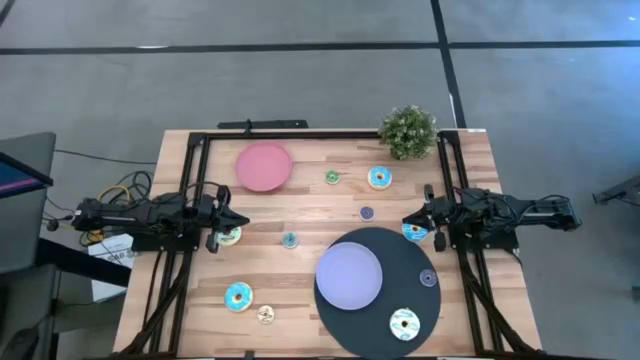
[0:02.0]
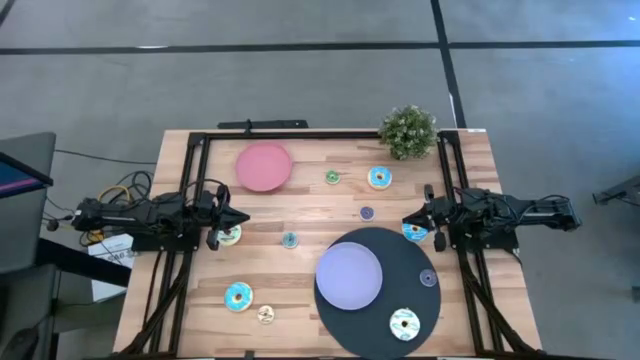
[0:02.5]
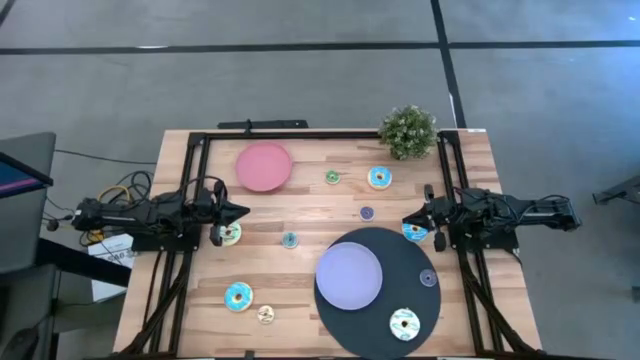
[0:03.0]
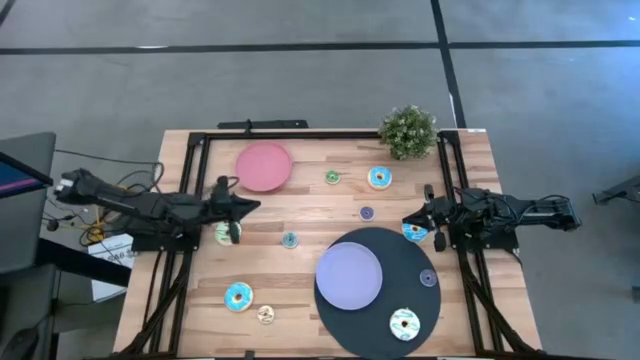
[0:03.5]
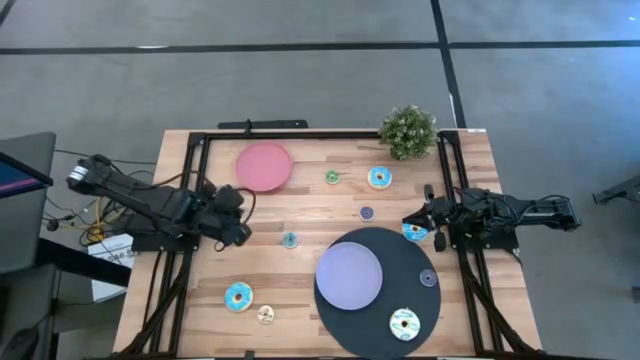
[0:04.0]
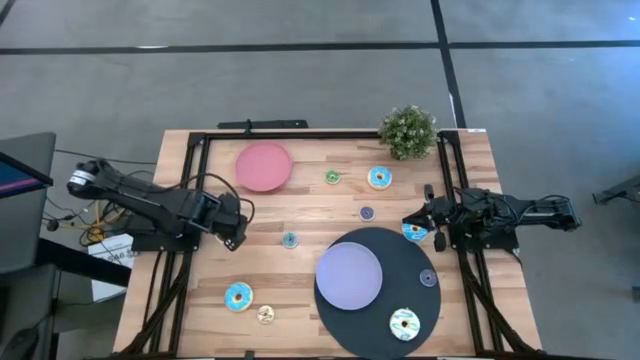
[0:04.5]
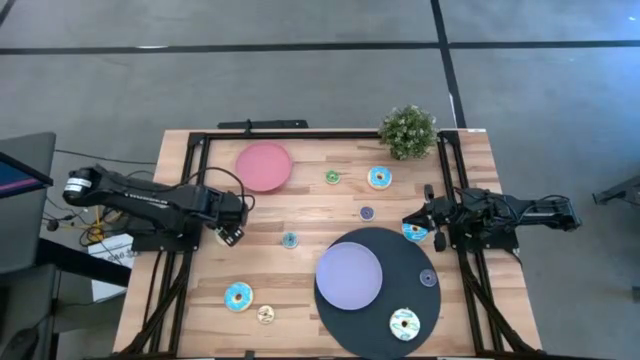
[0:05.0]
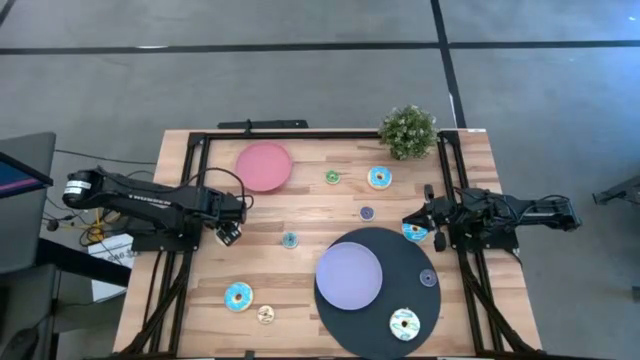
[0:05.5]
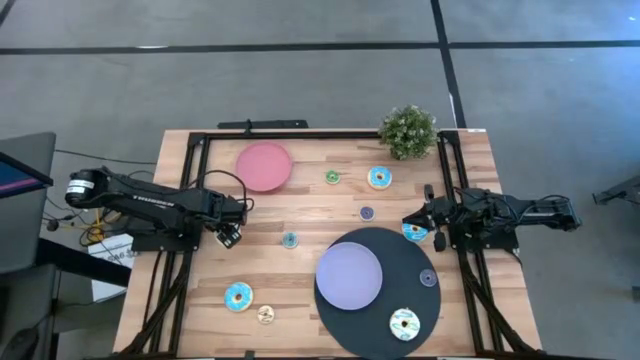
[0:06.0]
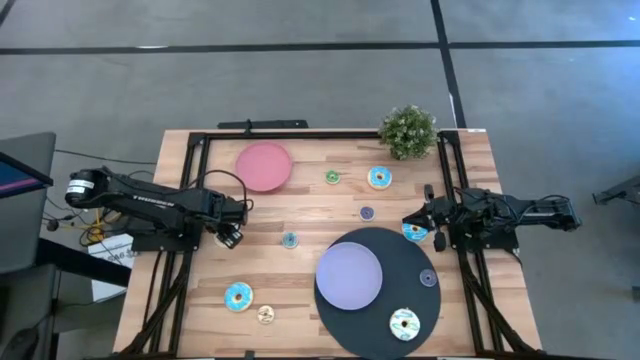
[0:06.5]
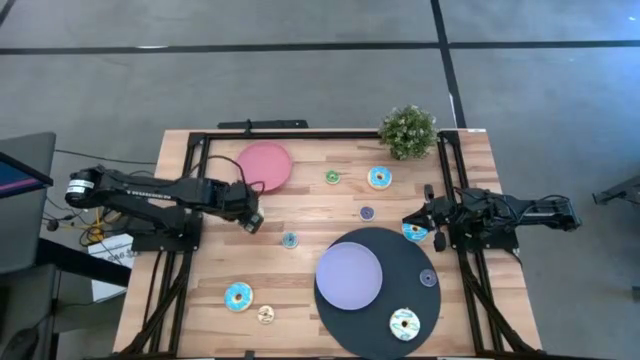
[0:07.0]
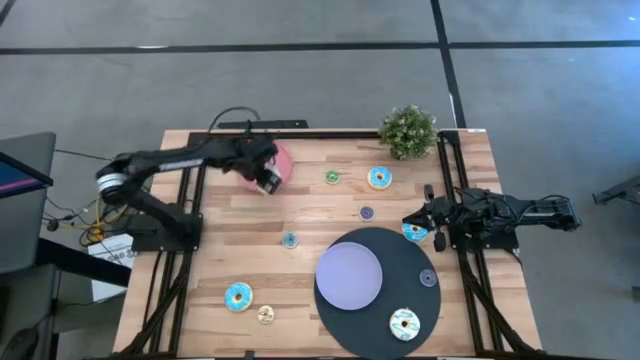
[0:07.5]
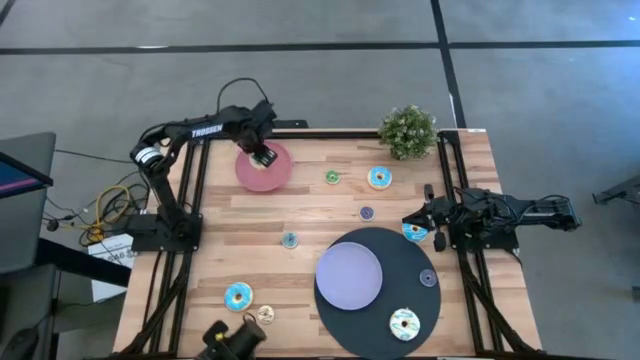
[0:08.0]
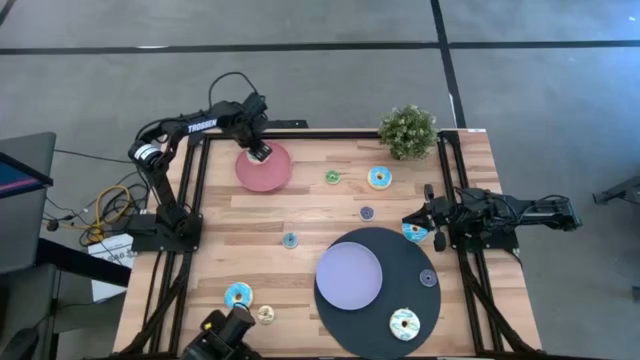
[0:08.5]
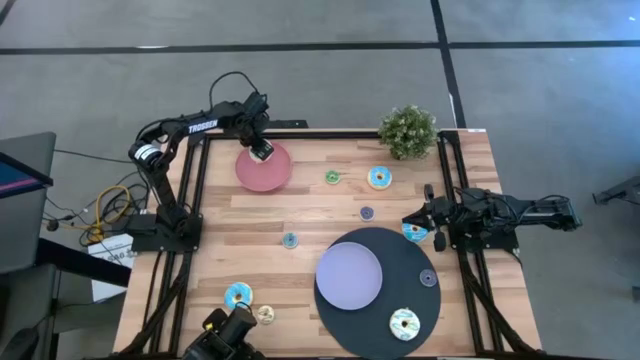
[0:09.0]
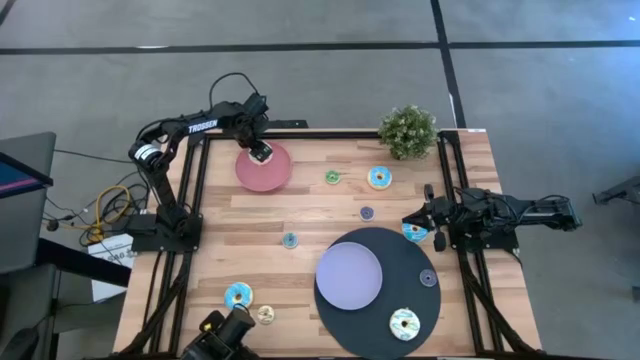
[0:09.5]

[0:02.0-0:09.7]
Task: Pick & Place donuts
Put the large light blue donut on the pink plate

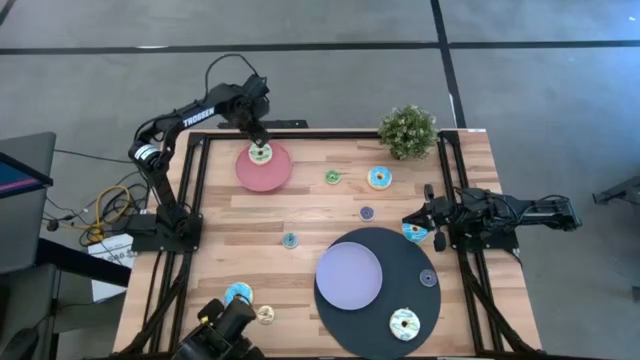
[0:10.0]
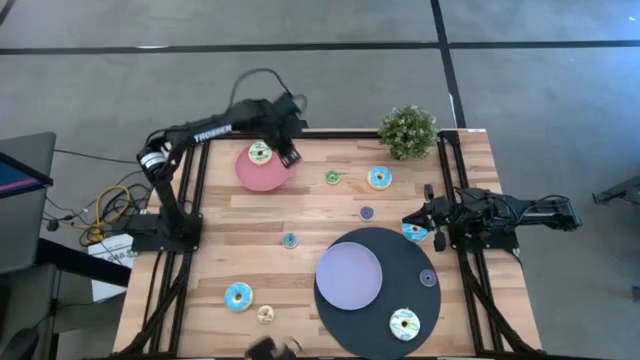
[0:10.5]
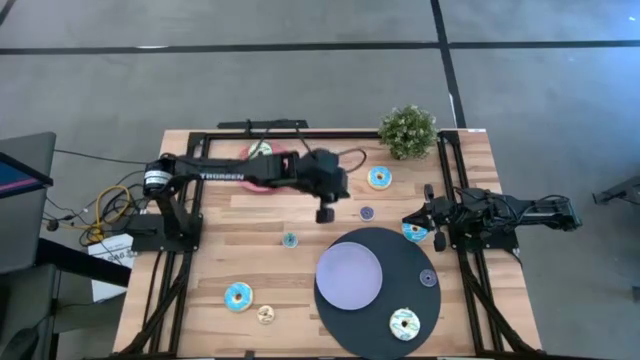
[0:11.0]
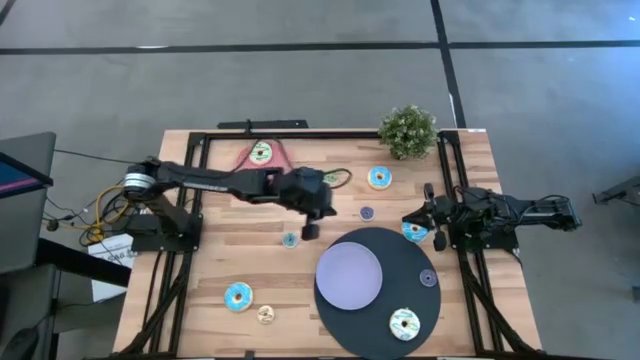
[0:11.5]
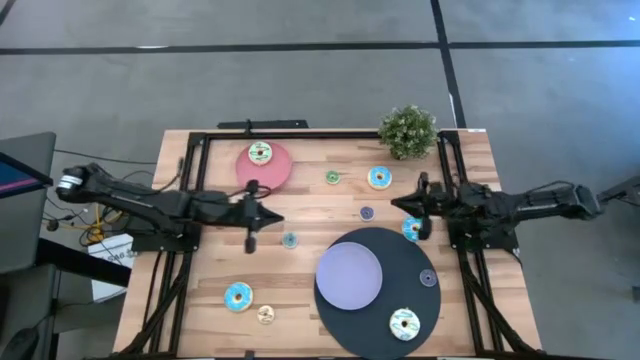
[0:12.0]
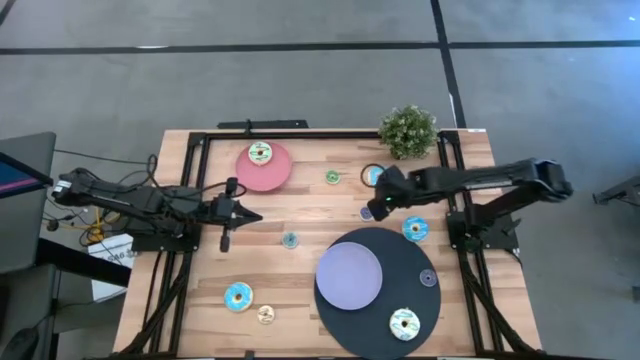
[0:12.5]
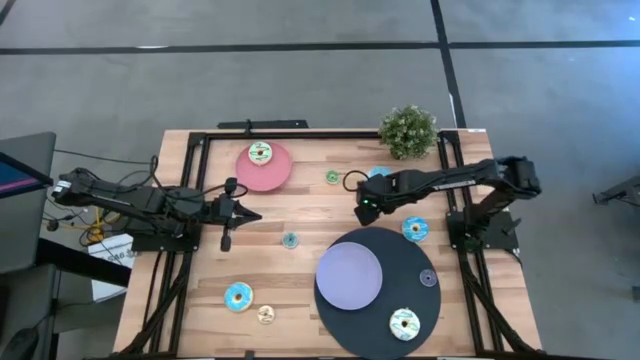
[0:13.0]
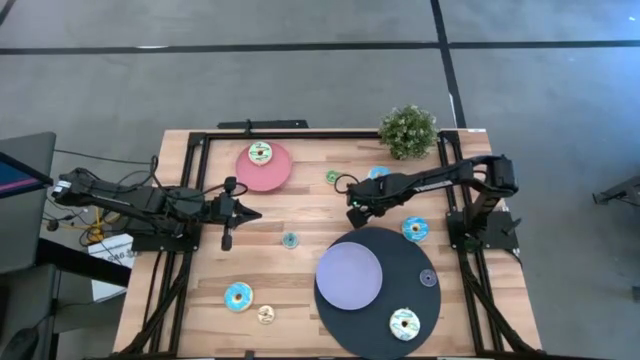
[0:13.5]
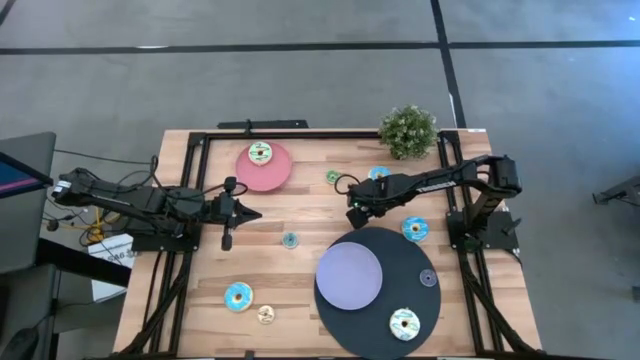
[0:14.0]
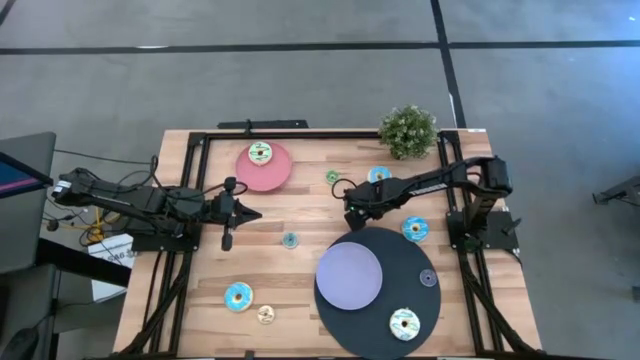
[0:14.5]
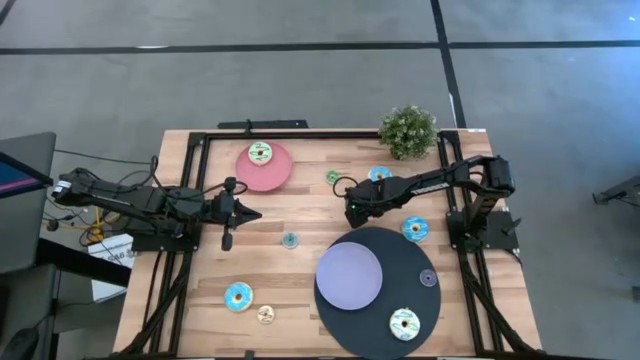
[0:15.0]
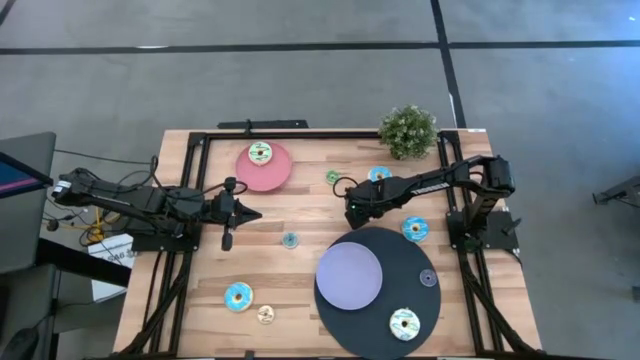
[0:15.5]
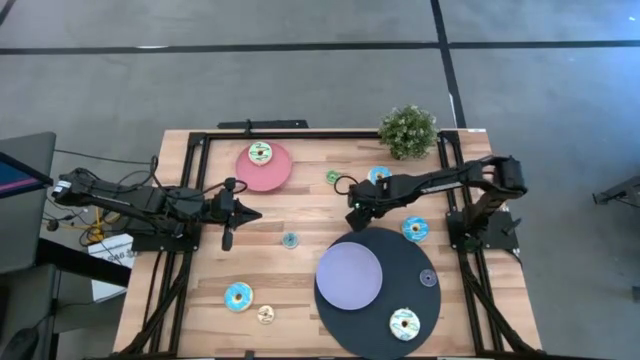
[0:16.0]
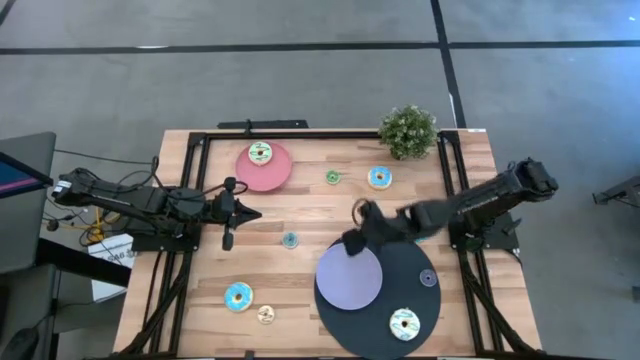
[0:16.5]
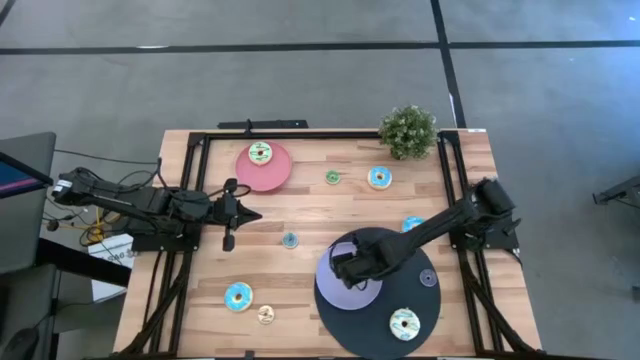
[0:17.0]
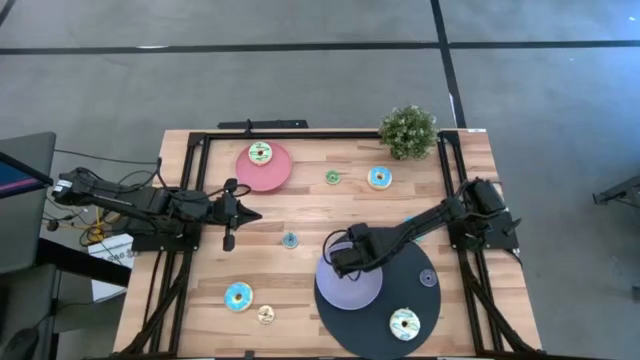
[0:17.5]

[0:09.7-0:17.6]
Put the top small purple donut on the purple plate

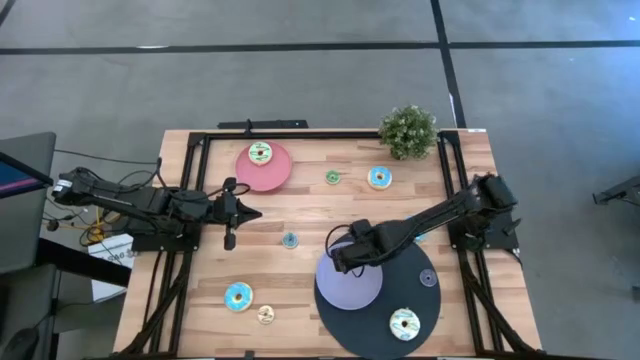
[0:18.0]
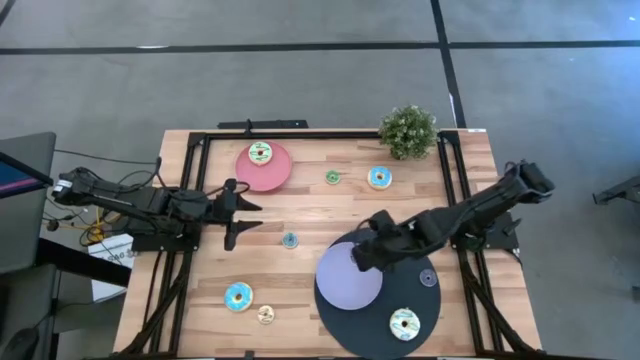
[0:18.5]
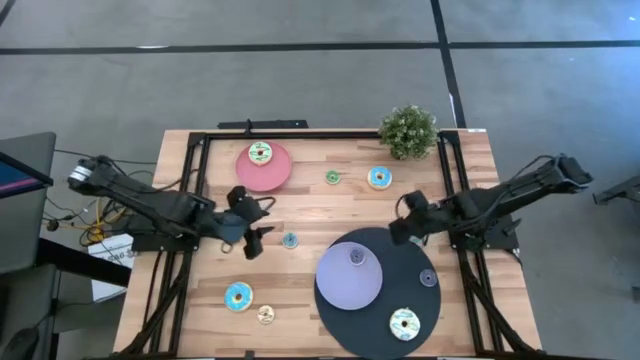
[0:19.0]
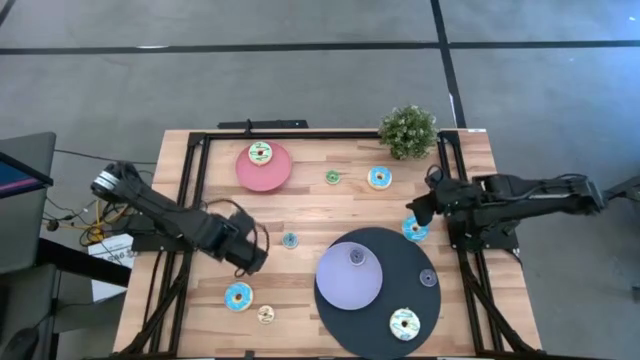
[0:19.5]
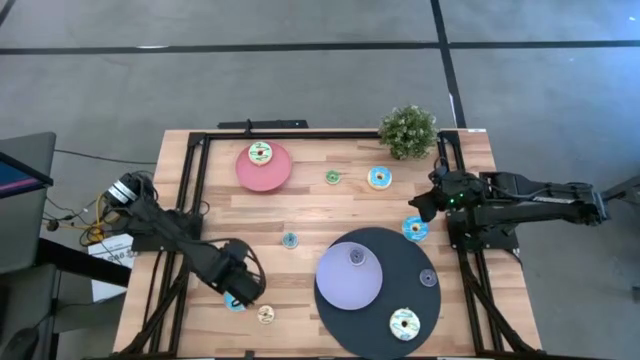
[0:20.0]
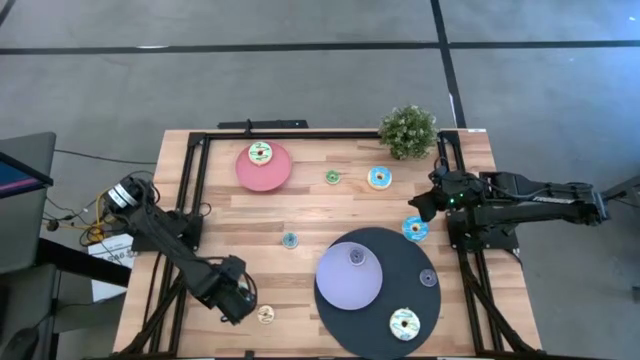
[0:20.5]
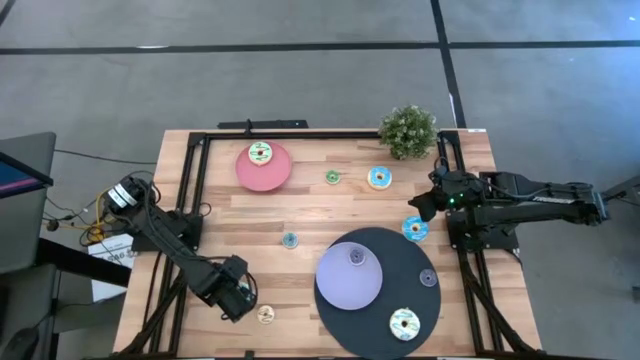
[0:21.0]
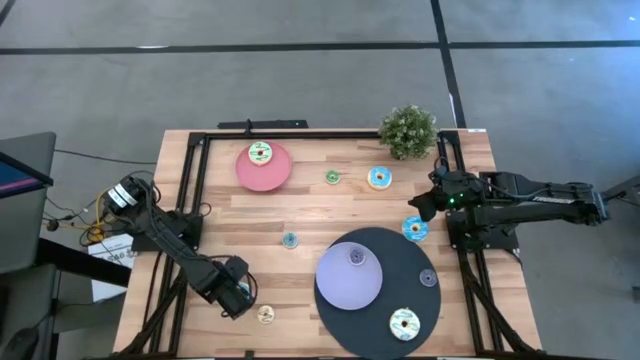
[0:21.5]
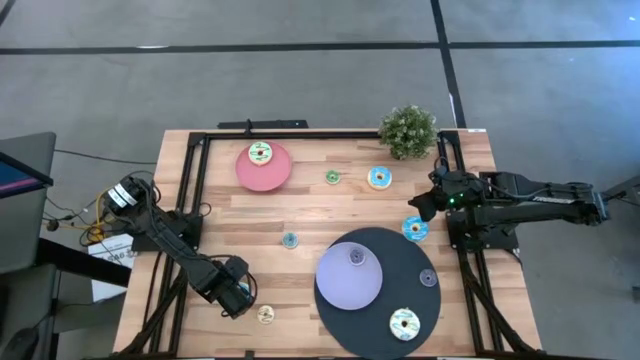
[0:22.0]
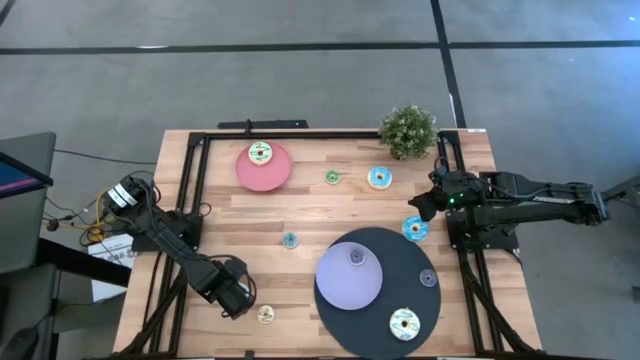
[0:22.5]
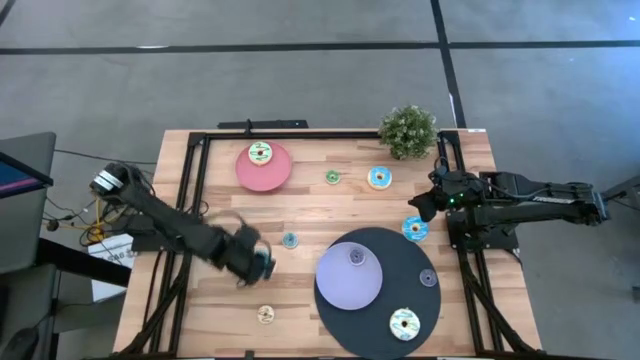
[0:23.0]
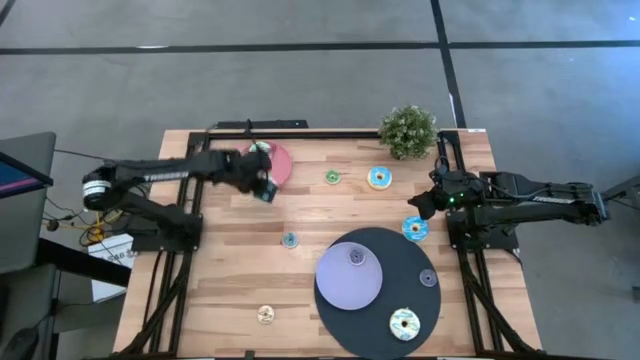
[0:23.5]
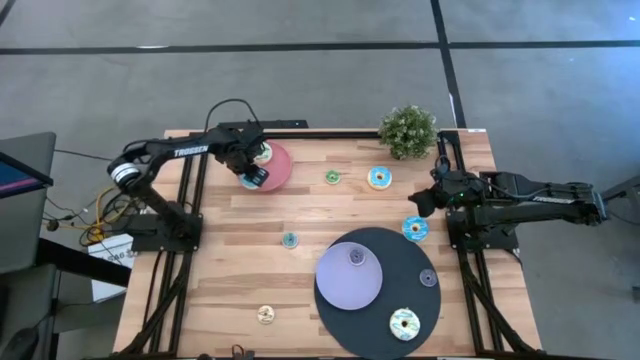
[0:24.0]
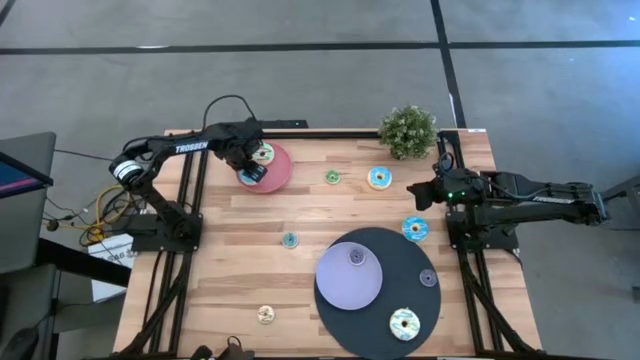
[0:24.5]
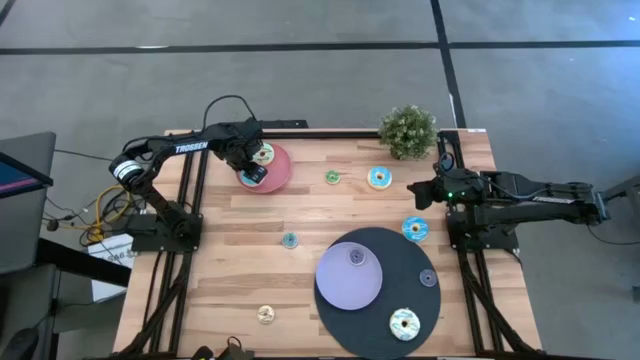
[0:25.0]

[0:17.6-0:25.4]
Put the bottom large blue donut on the pink plate
